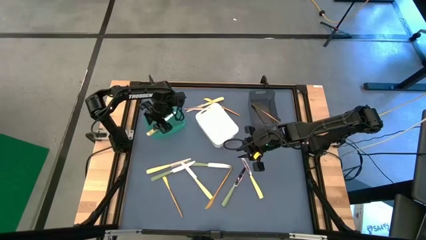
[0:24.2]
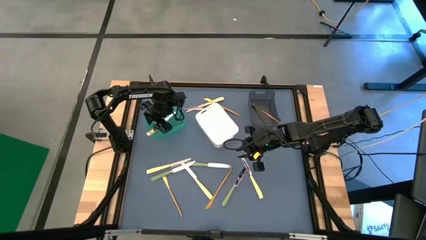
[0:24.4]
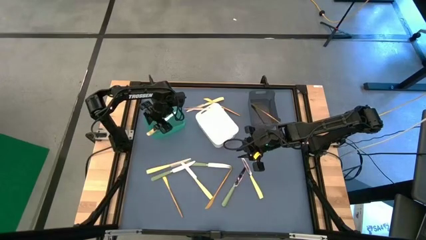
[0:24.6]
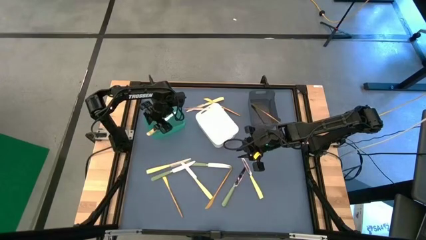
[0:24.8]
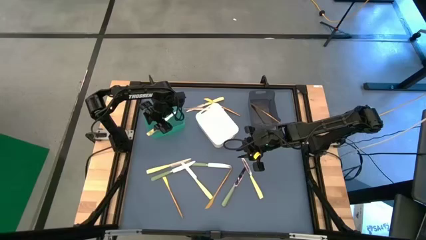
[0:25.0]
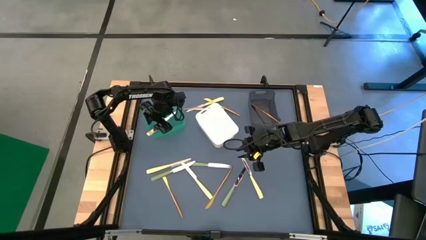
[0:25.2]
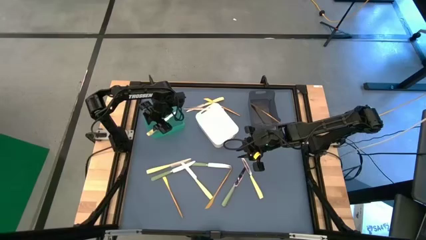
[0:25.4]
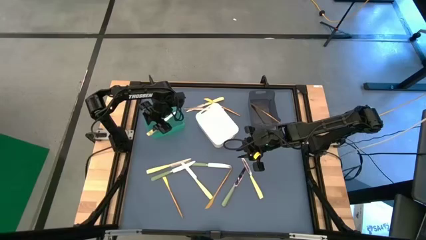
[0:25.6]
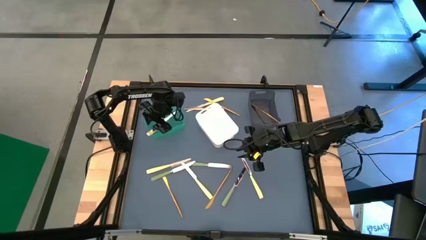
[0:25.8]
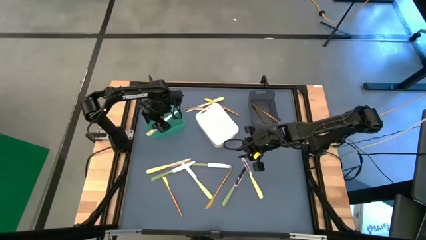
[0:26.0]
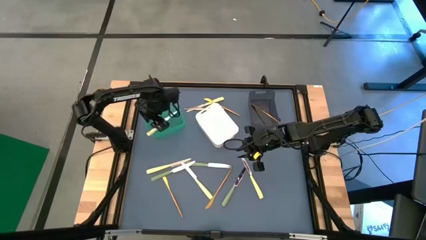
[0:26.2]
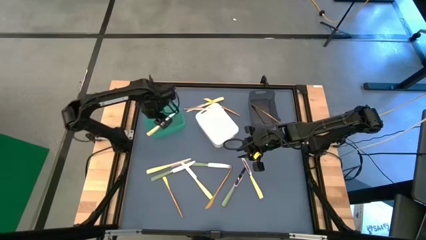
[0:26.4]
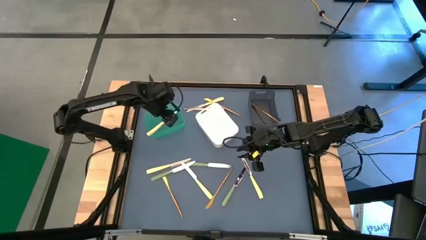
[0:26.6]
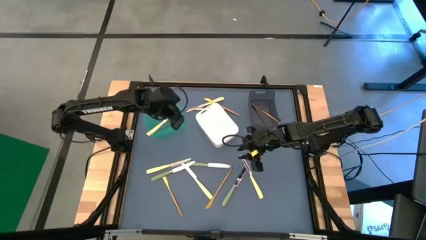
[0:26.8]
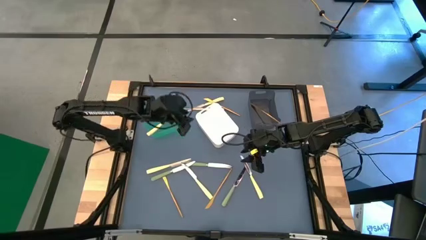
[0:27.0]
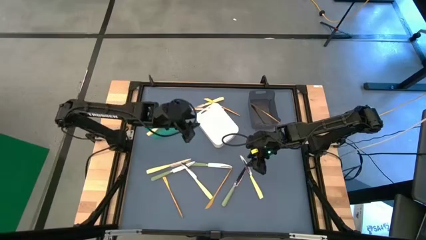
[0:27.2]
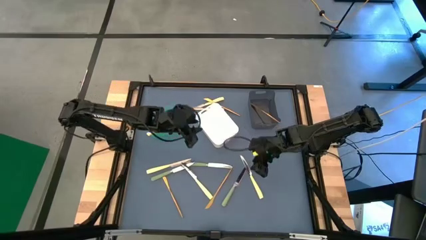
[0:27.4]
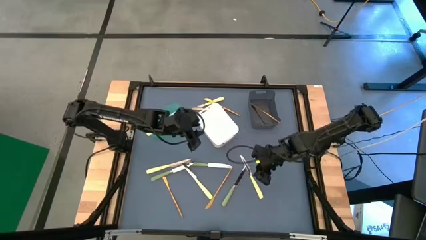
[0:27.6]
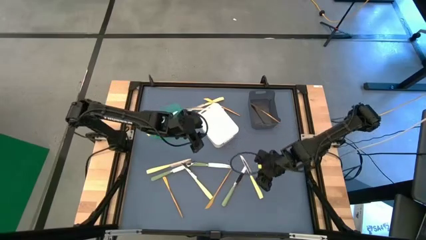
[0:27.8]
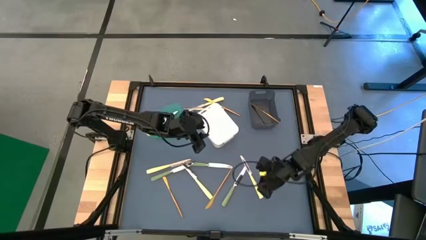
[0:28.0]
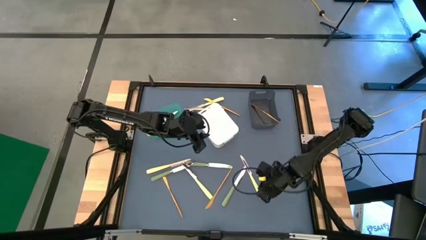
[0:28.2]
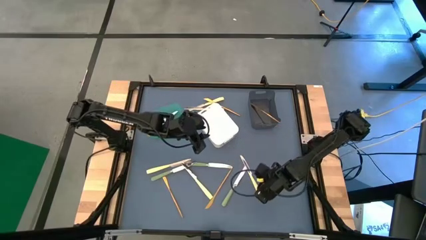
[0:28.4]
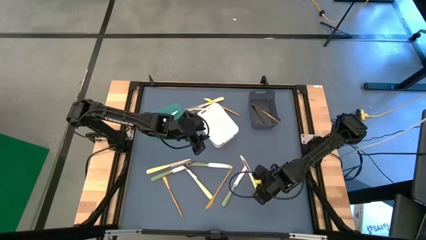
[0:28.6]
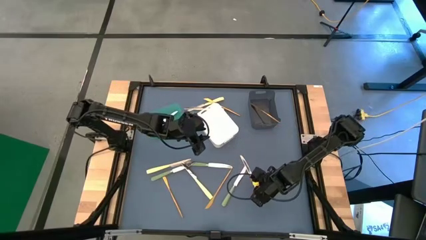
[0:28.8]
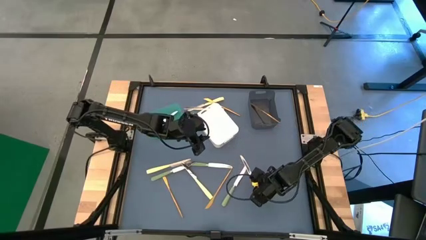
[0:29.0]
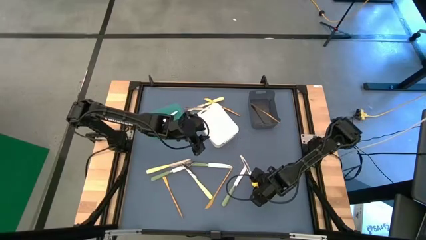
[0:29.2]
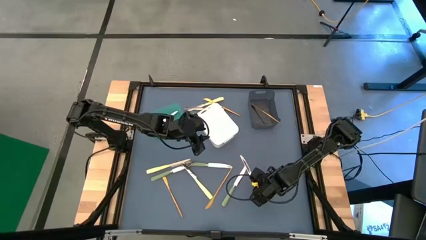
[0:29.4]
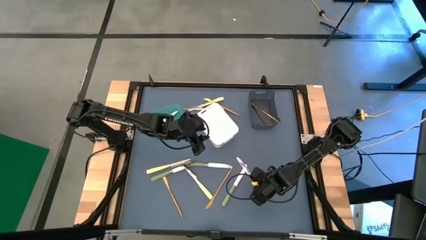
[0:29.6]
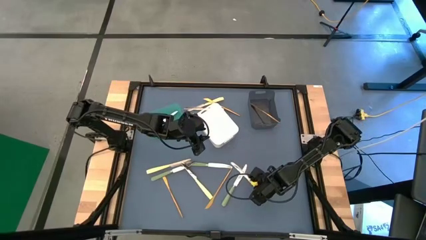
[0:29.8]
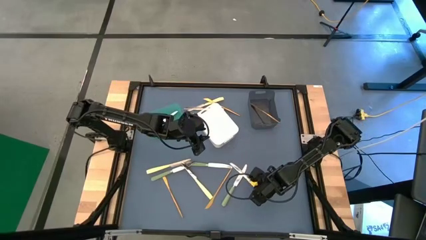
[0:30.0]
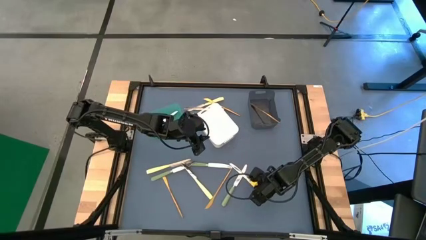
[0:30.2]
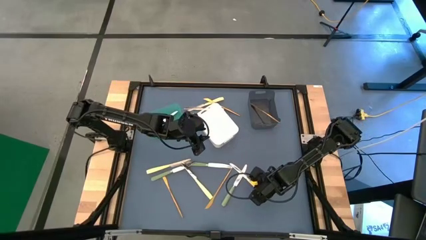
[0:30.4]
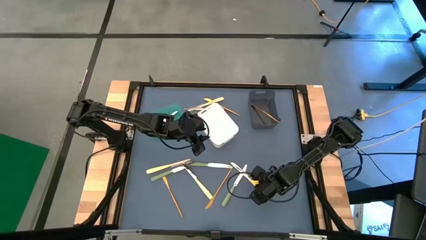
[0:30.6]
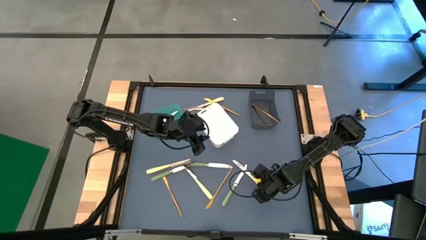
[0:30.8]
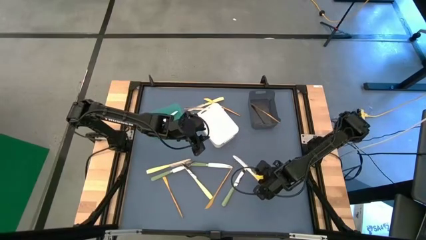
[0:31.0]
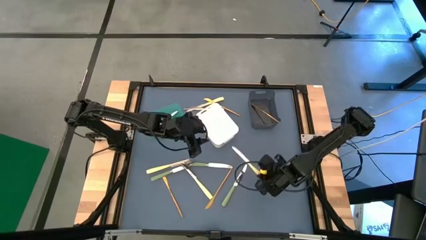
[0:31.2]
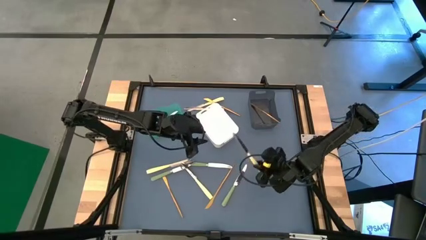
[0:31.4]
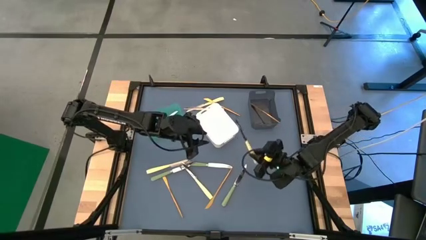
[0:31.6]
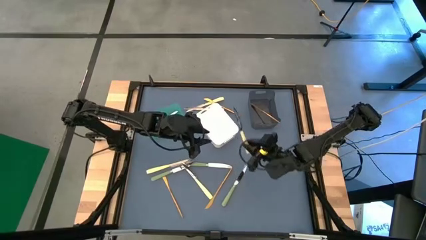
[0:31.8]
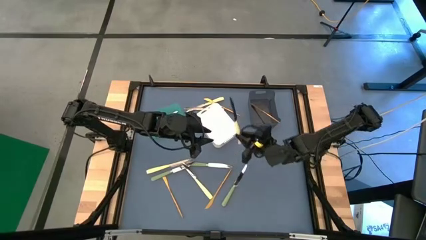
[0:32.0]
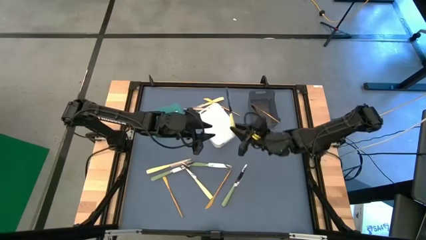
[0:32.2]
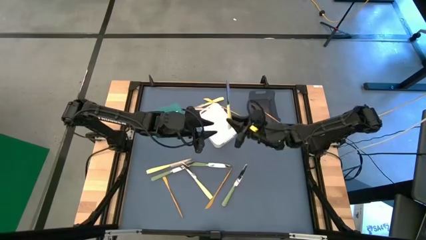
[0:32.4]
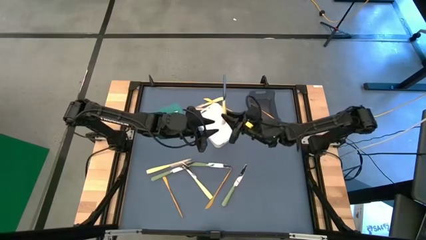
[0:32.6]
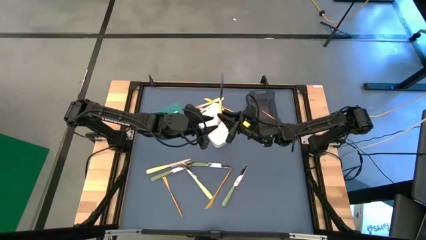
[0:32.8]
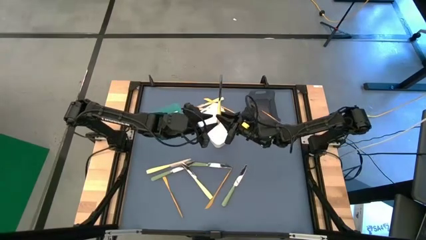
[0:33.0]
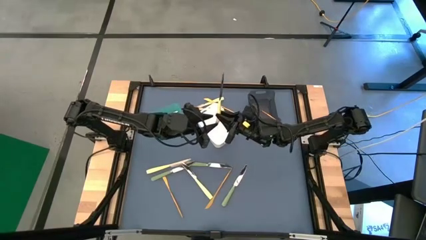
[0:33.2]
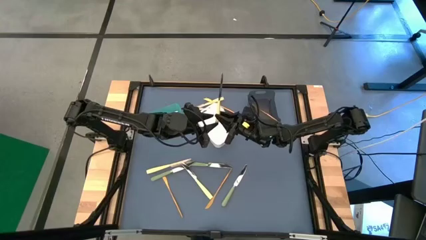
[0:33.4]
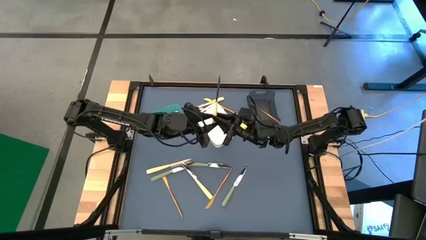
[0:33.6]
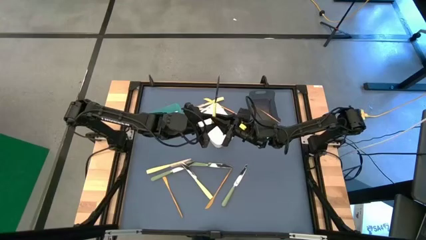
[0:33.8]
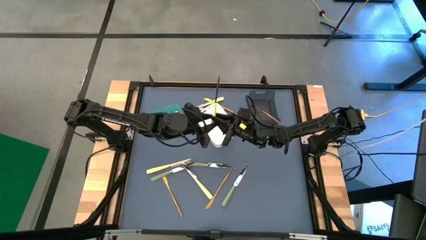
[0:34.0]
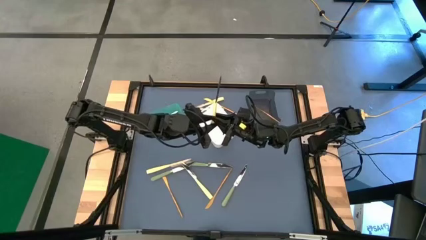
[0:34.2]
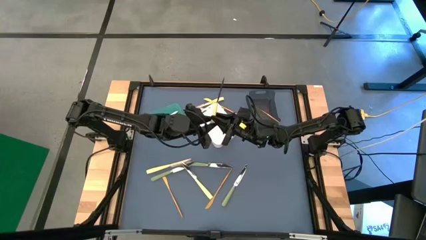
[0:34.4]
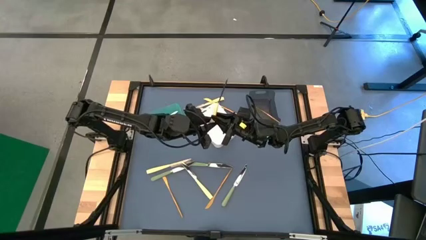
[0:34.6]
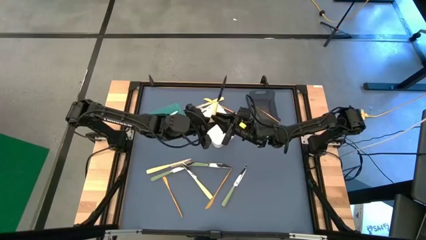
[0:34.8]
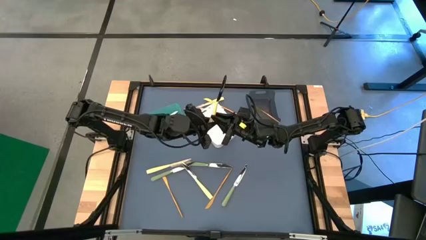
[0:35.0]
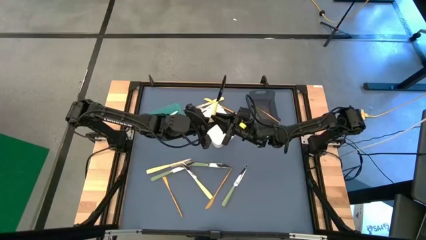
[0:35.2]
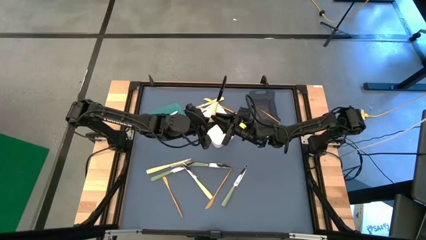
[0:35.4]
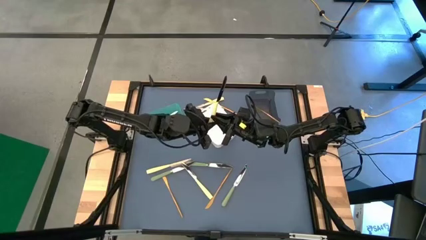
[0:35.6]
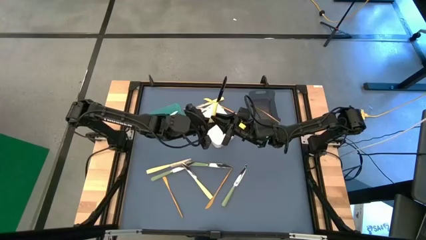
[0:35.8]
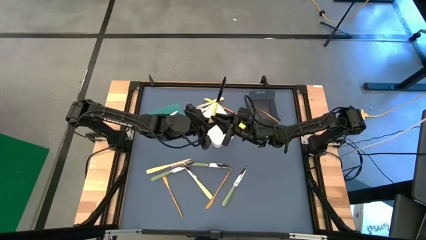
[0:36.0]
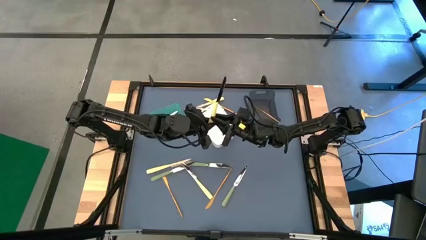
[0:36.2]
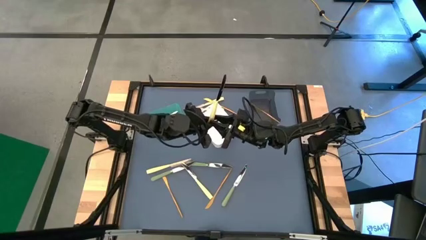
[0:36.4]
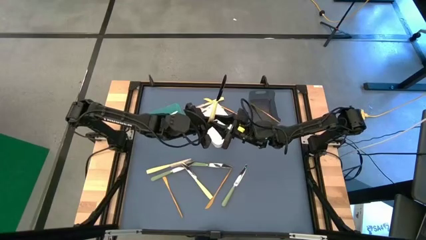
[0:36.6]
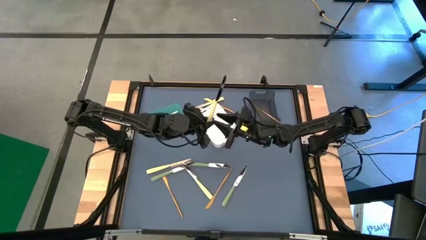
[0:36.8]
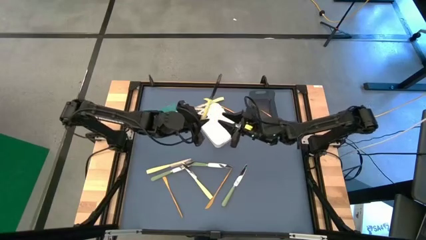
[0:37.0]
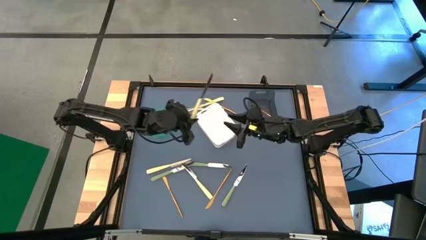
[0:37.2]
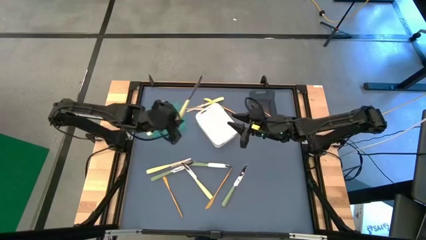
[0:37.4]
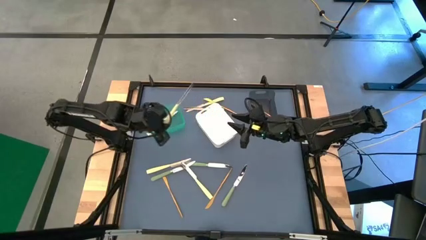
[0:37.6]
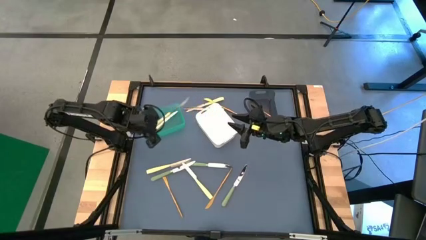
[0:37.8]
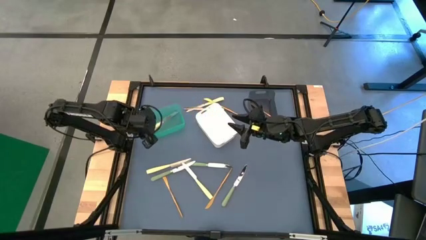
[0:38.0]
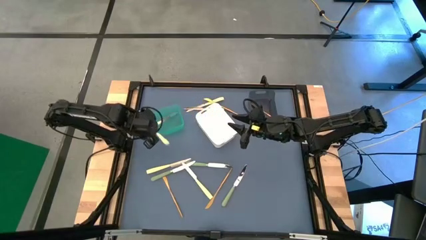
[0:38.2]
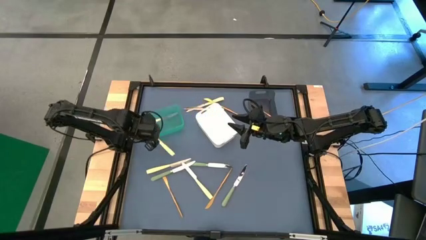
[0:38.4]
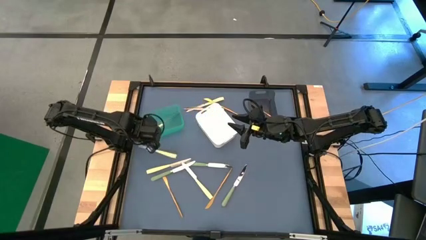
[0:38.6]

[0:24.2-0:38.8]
Task: Sort silverware by color (type)
Put the right yellow table knife into the green bin
